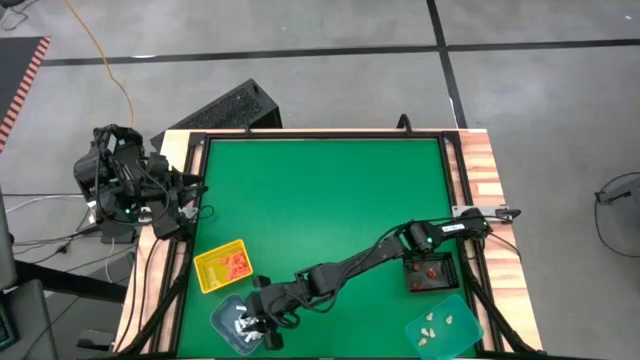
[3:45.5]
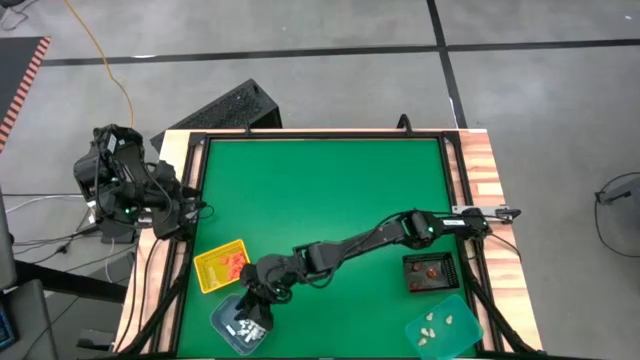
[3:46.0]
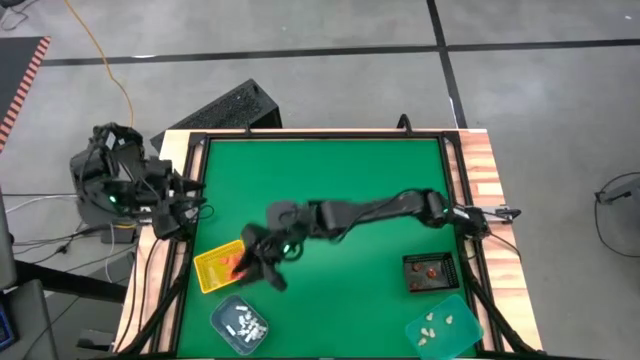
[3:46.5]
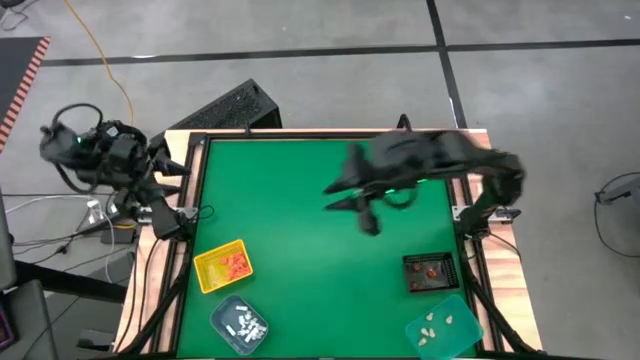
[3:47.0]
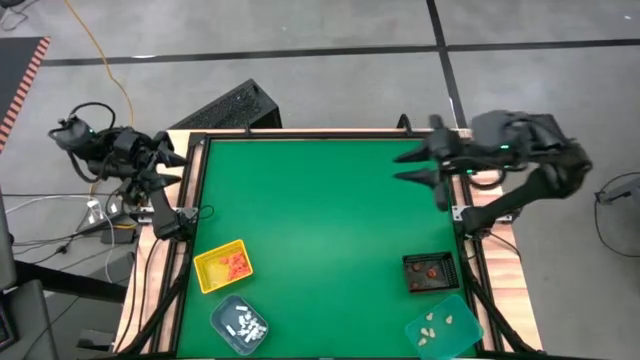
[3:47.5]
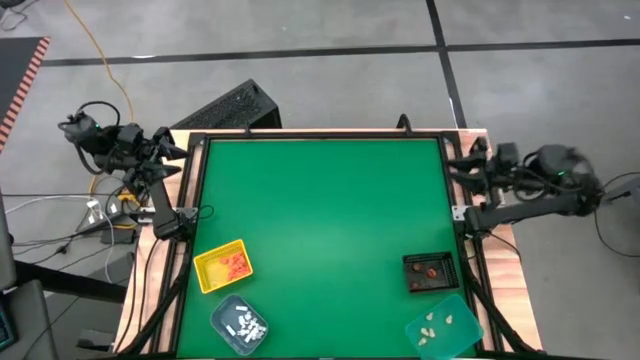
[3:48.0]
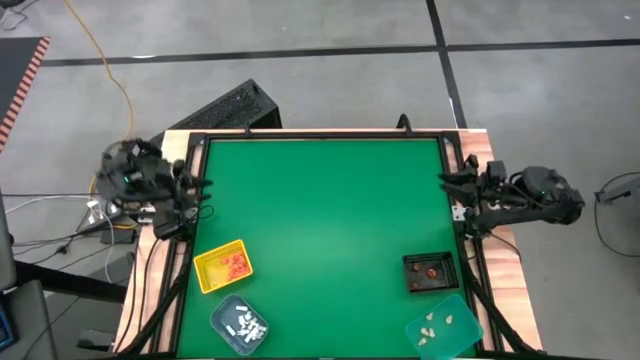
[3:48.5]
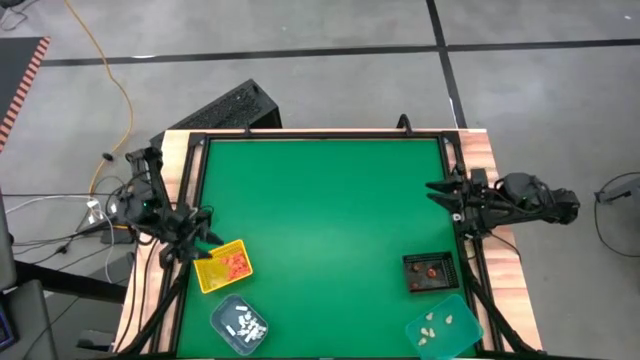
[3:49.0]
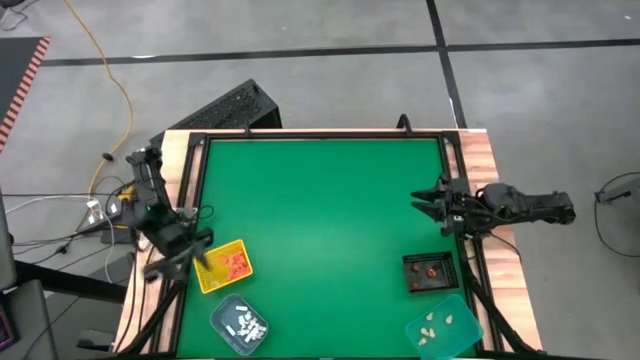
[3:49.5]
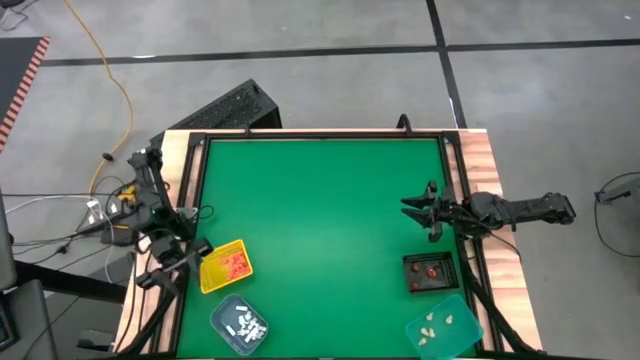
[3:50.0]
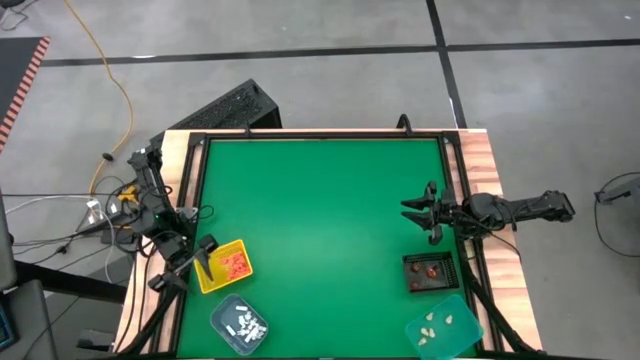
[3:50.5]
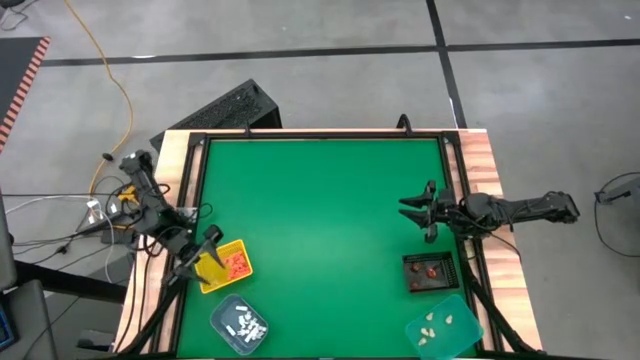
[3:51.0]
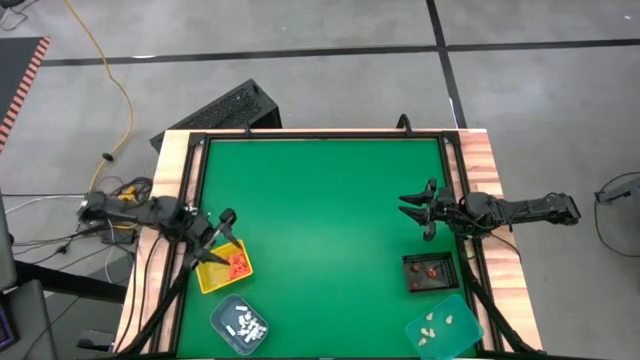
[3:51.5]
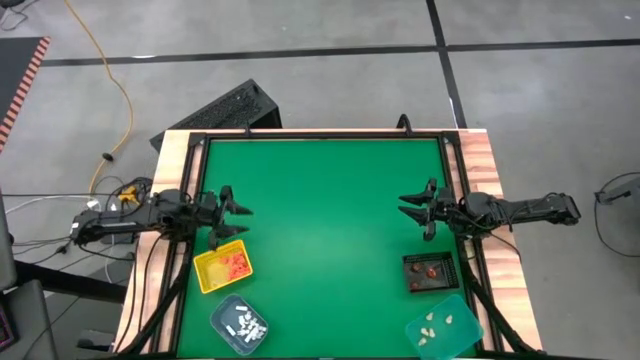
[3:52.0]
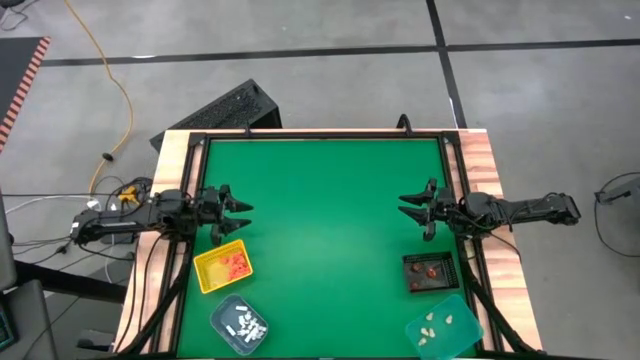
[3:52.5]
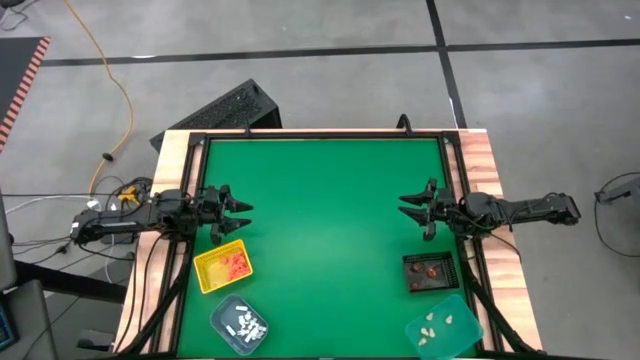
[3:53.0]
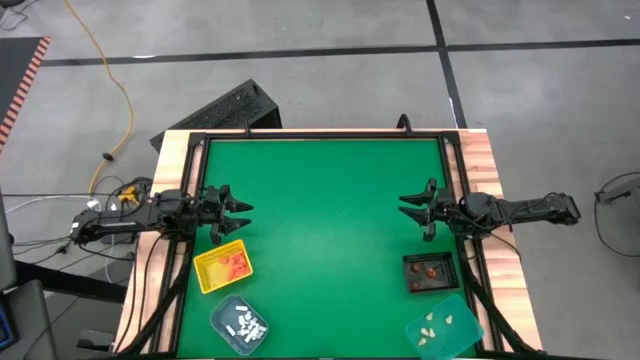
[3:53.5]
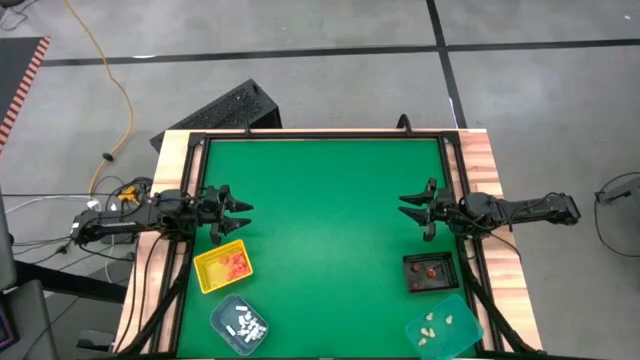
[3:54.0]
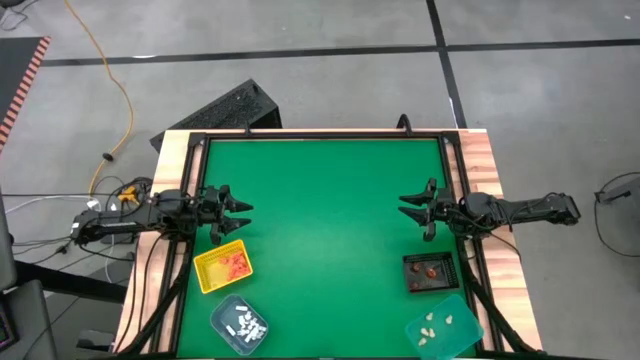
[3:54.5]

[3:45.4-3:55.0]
Task: Sort Halloween decoration
Return to Home Position

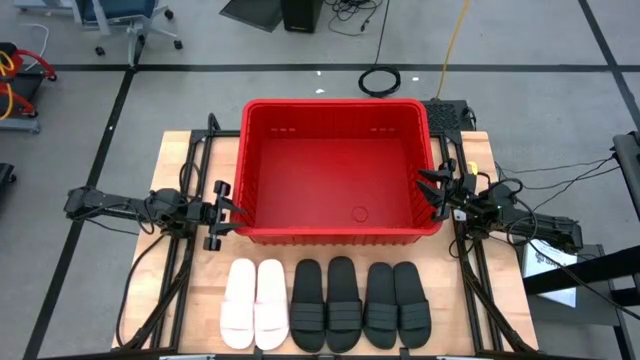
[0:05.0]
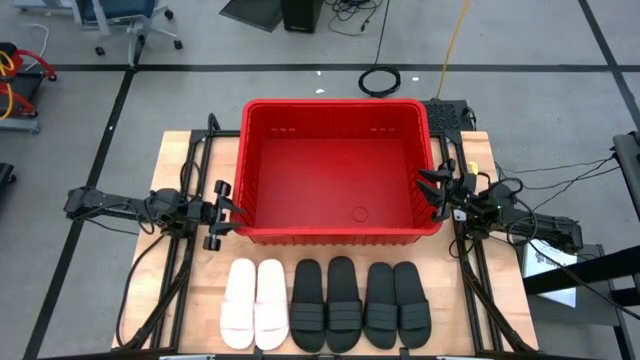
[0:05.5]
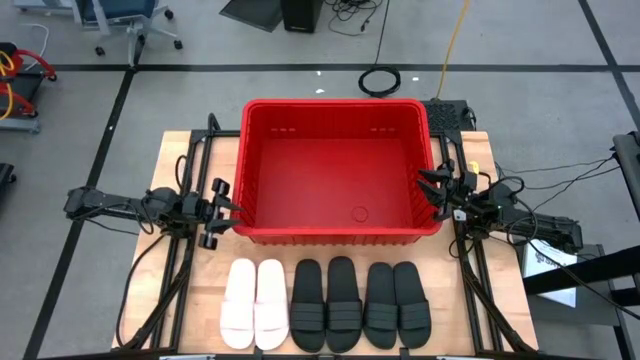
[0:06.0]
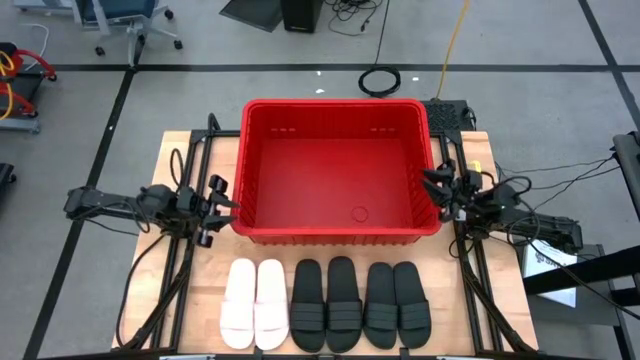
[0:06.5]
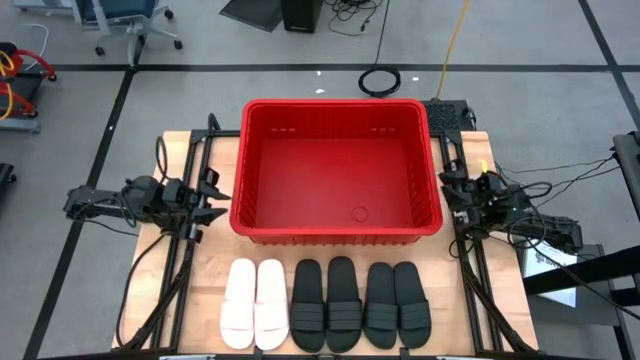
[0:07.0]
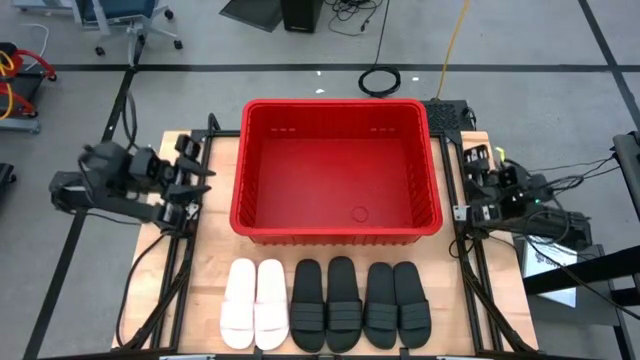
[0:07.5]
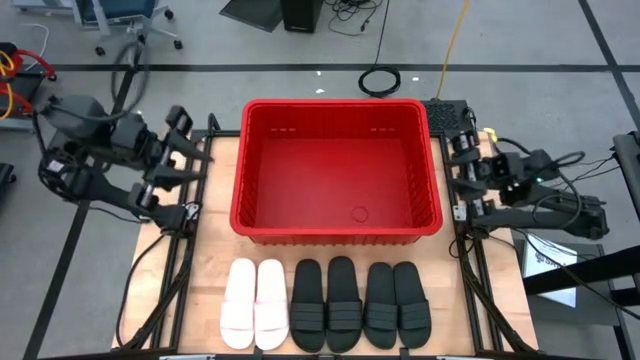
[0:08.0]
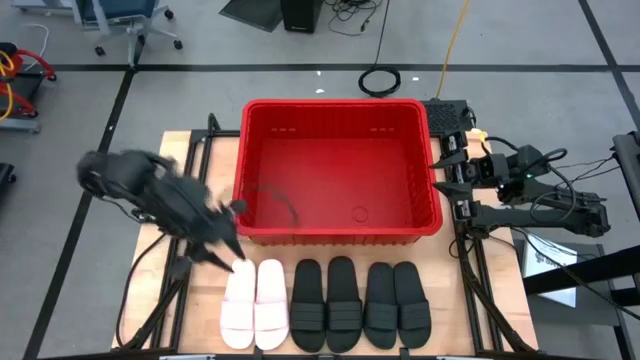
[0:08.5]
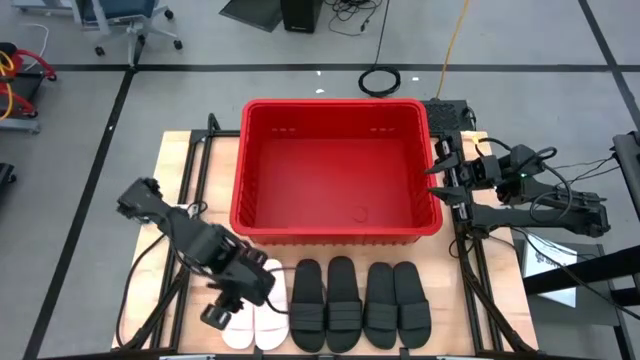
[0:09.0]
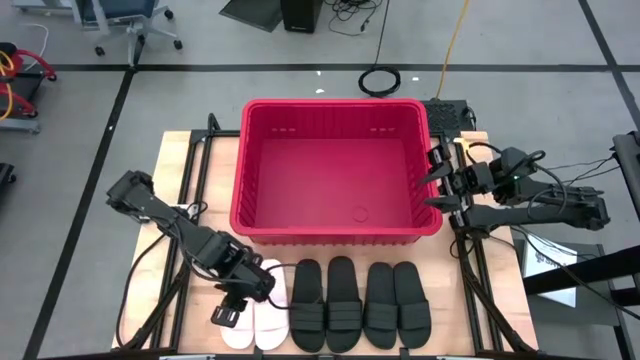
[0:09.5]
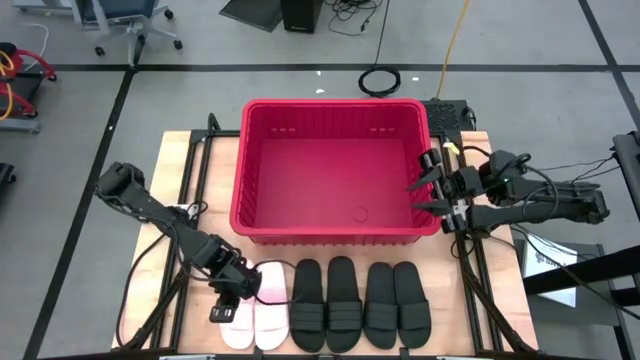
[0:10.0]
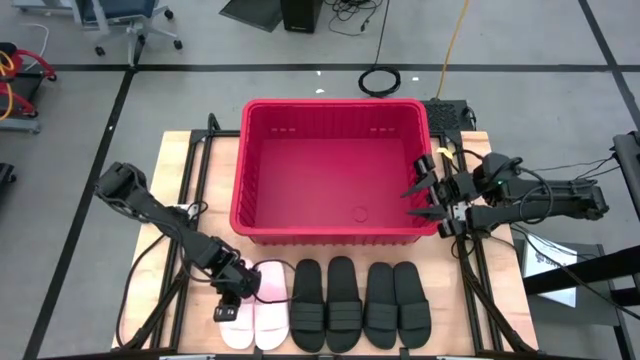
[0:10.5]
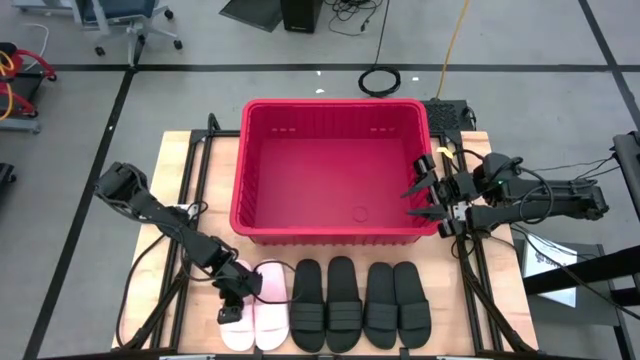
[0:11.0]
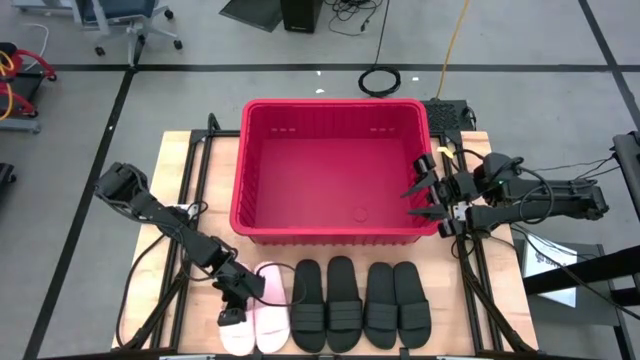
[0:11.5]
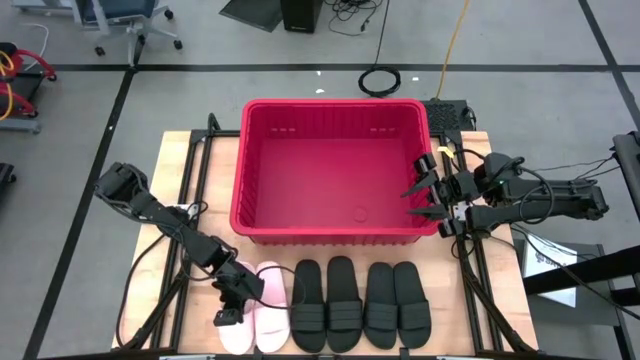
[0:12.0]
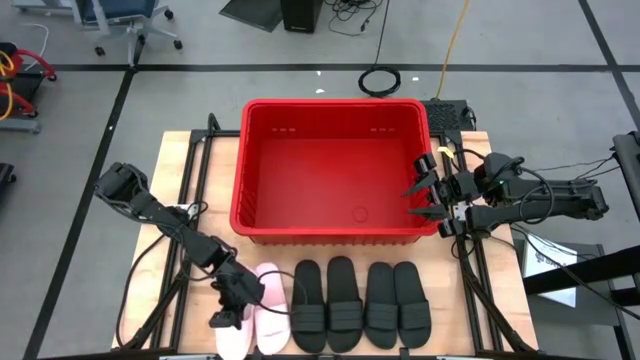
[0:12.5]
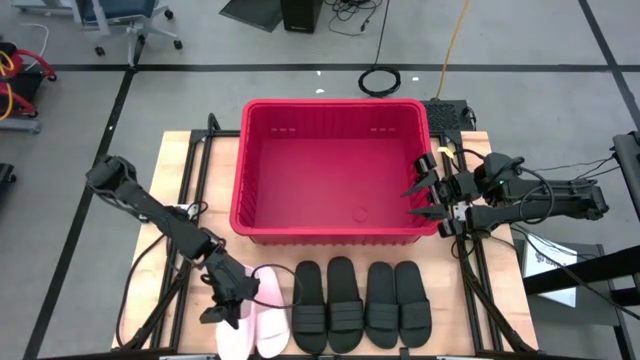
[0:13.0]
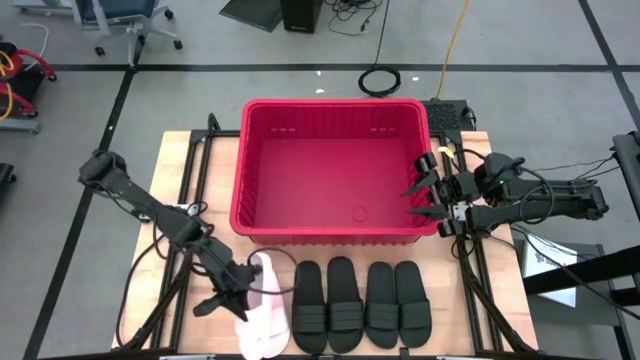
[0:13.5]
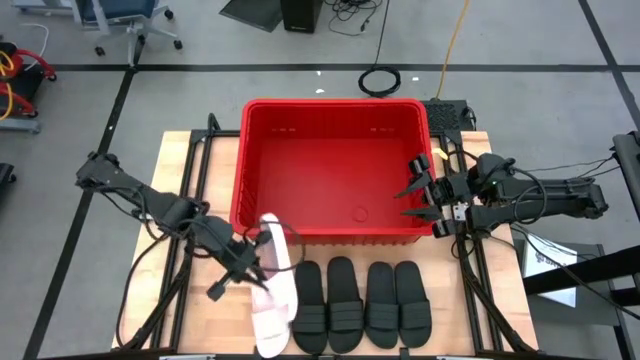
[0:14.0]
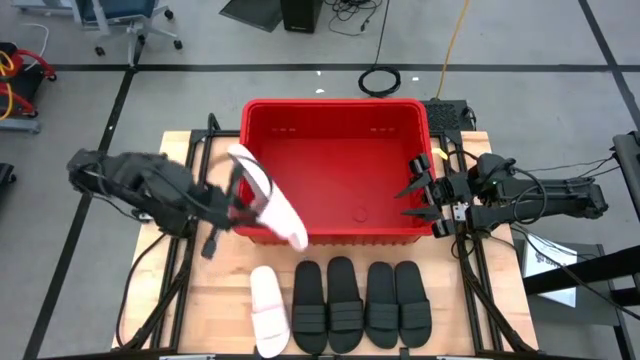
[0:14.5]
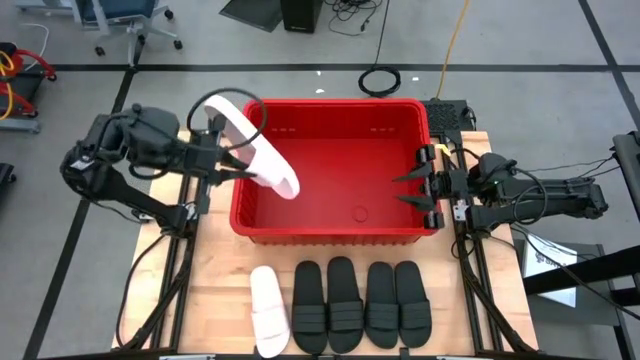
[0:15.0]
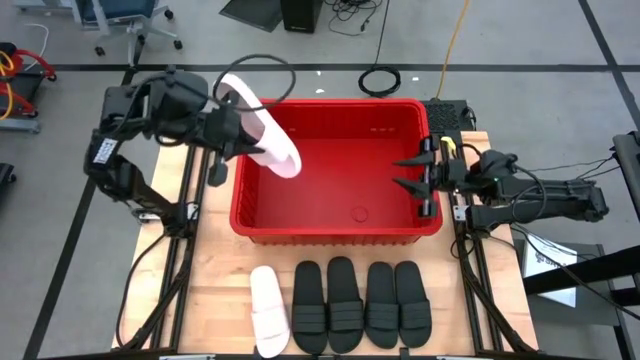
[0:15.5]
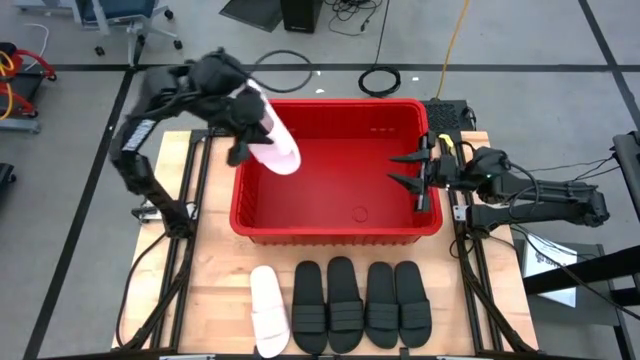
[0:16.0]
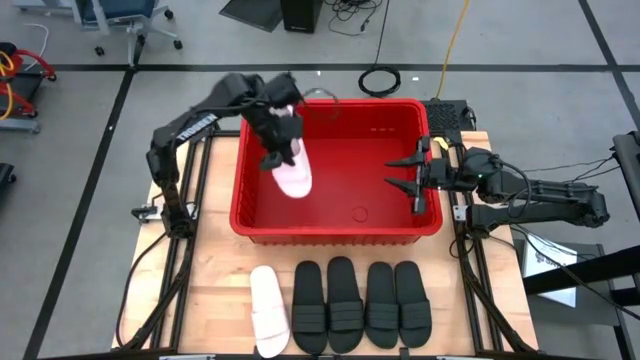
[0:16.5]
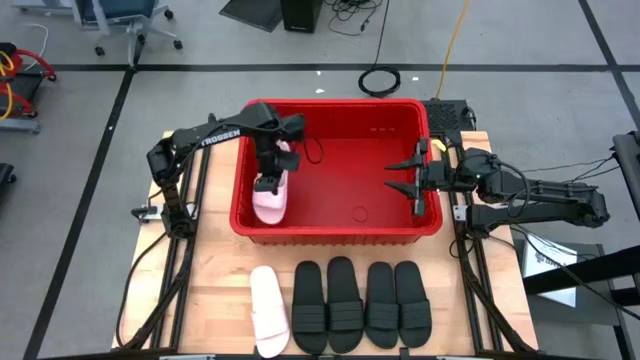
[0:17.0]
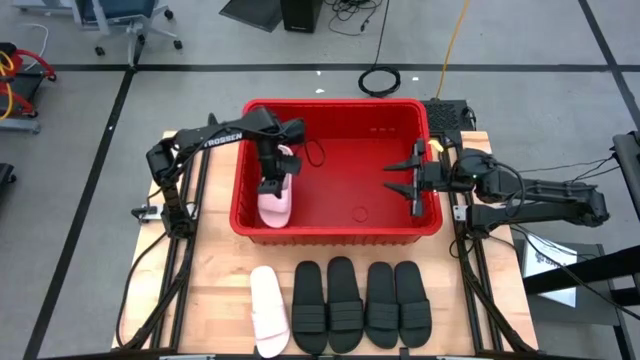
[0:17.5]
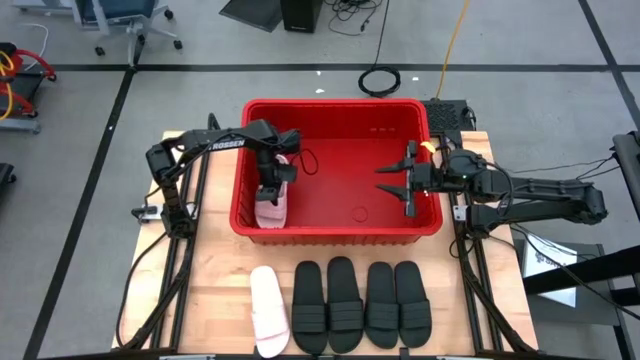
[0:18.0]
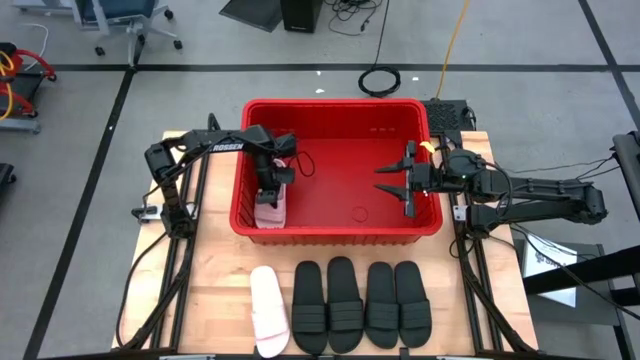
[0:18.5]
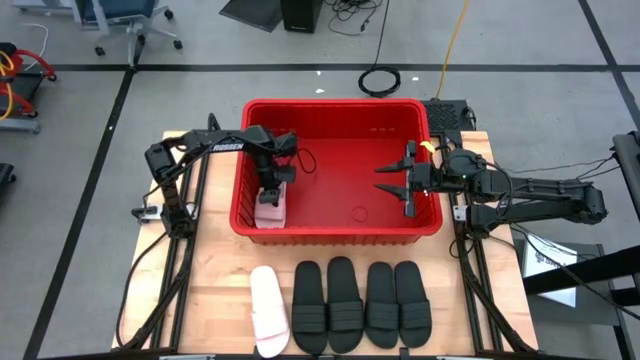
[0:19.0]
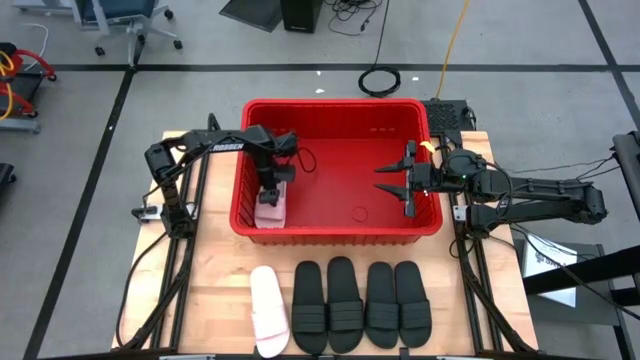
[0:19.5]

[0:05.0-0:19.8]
Task: Pick and place slides into bin
Put the pink slide into the red bin
